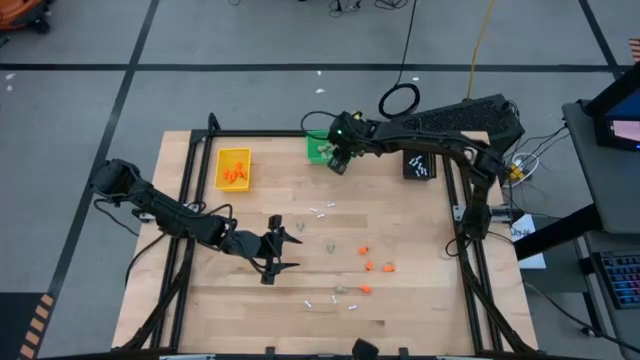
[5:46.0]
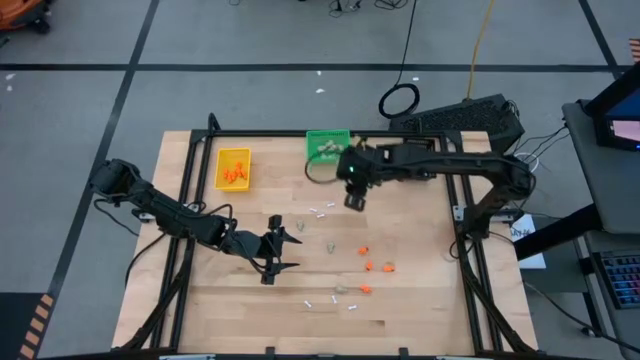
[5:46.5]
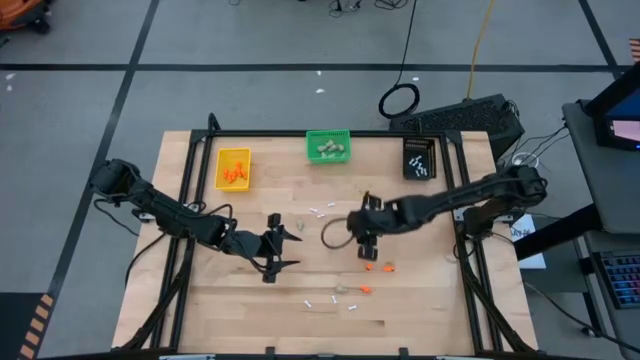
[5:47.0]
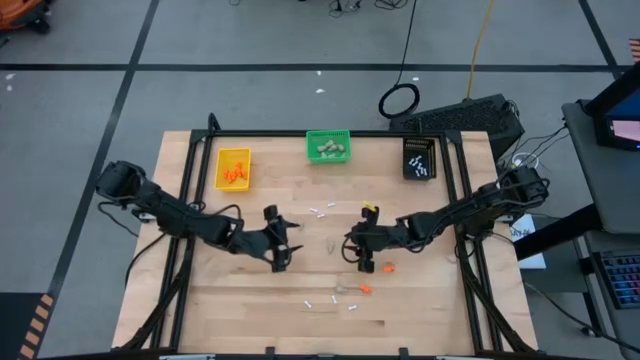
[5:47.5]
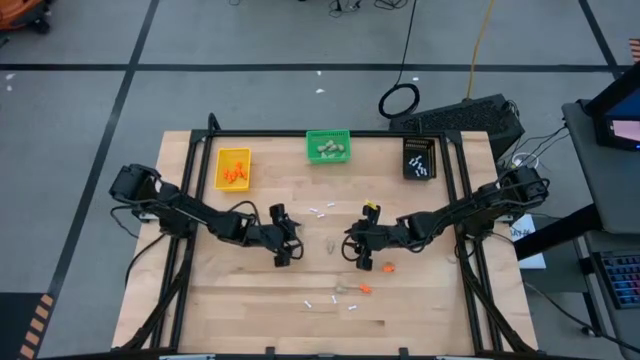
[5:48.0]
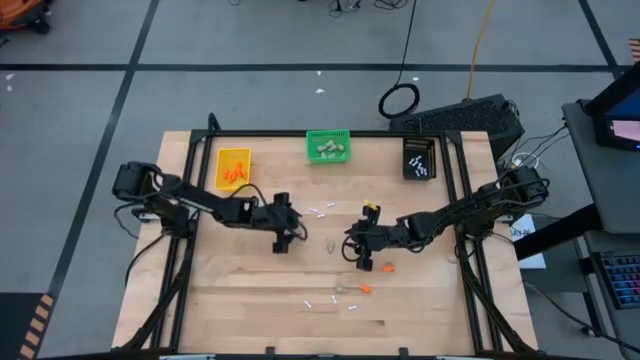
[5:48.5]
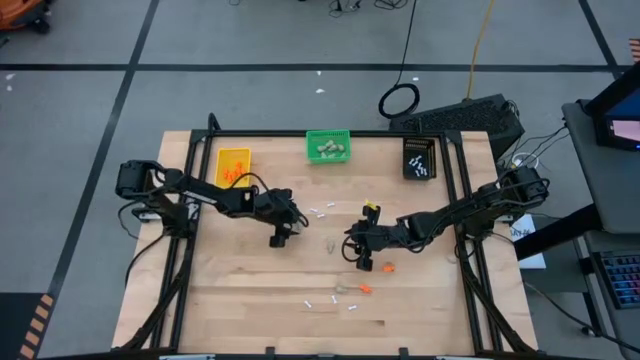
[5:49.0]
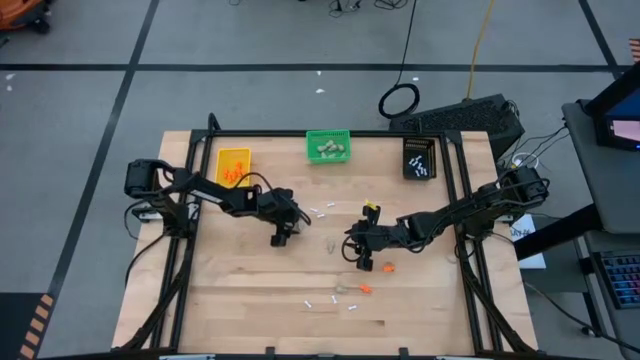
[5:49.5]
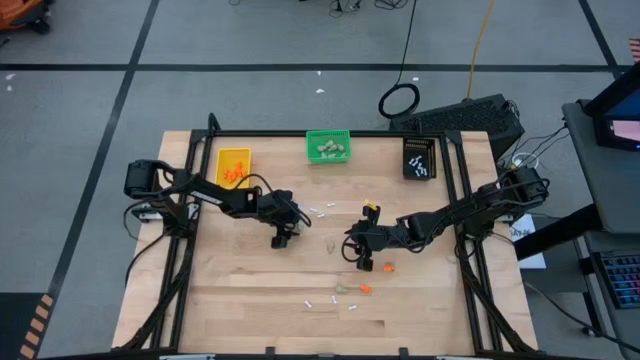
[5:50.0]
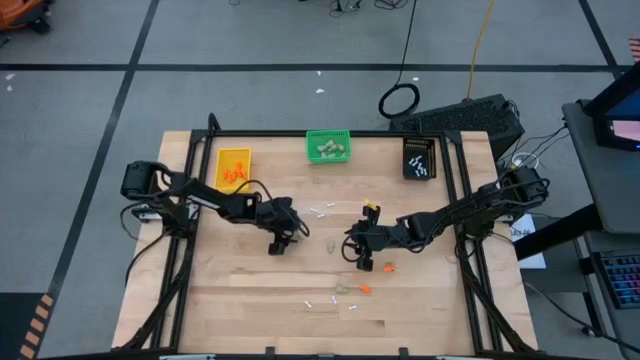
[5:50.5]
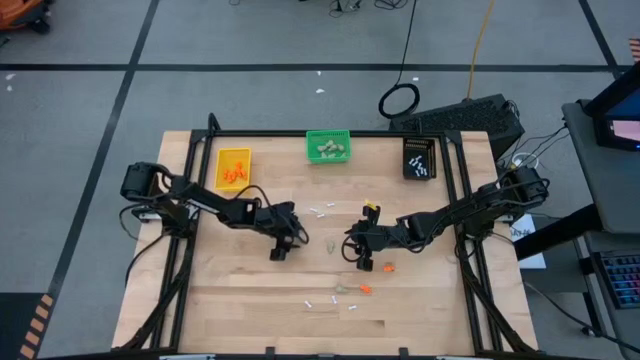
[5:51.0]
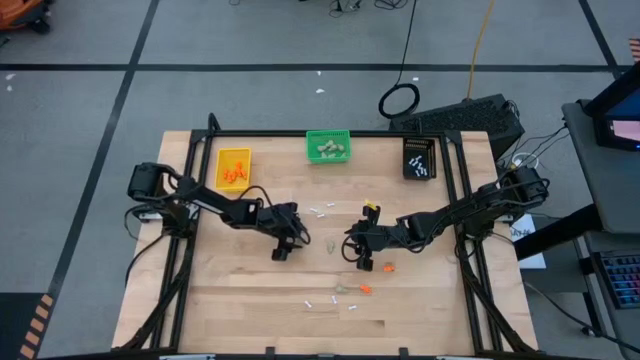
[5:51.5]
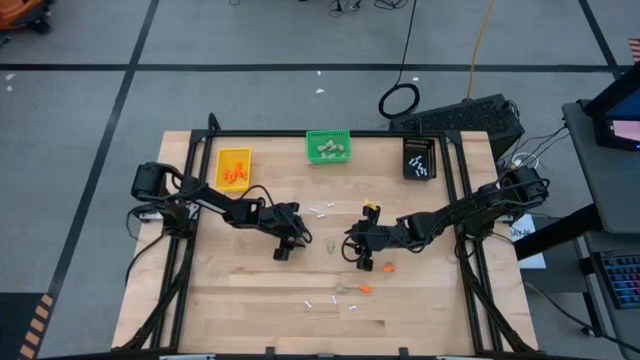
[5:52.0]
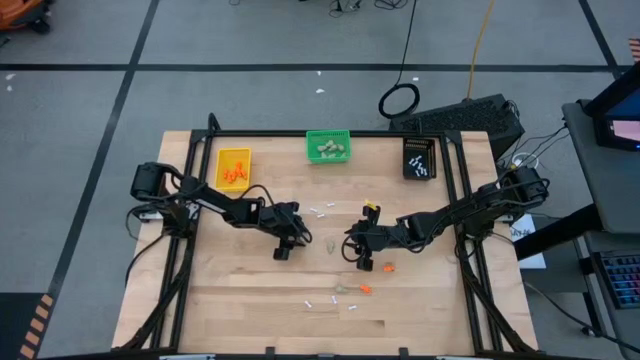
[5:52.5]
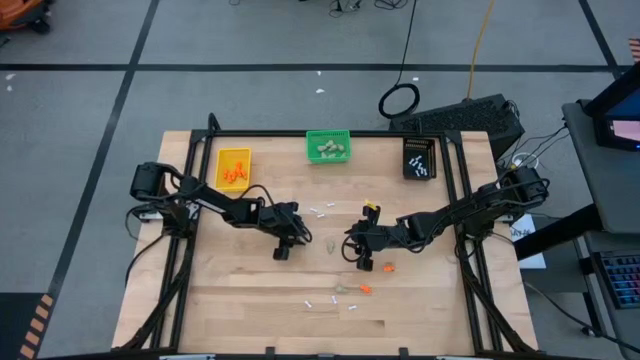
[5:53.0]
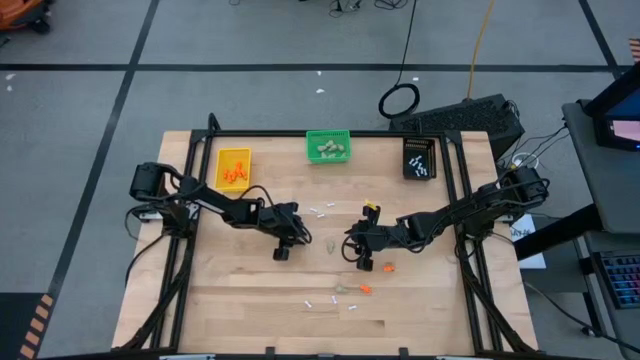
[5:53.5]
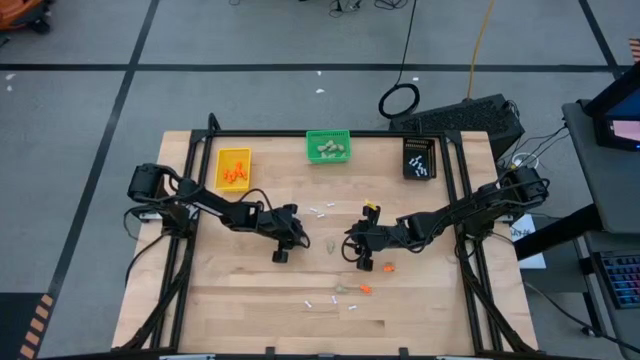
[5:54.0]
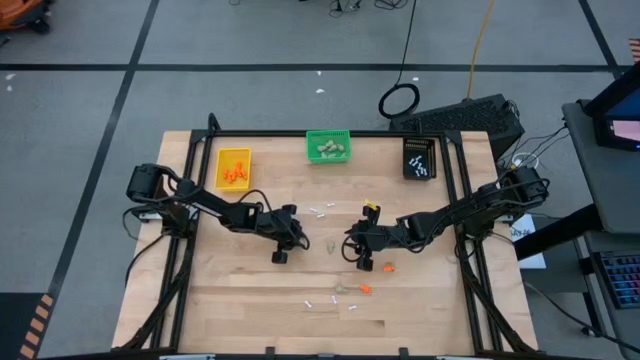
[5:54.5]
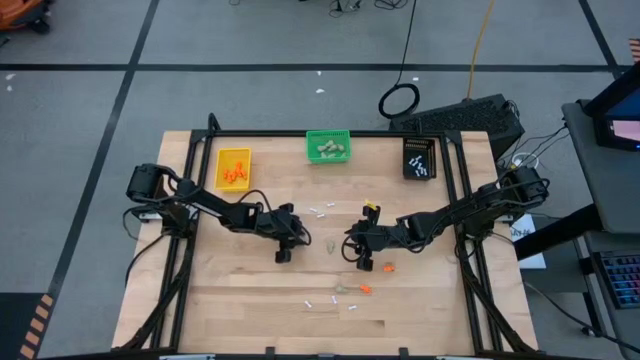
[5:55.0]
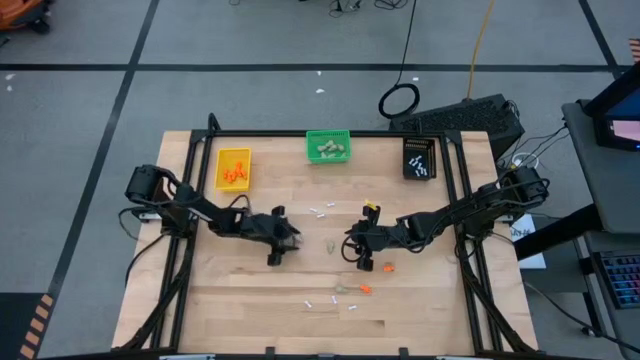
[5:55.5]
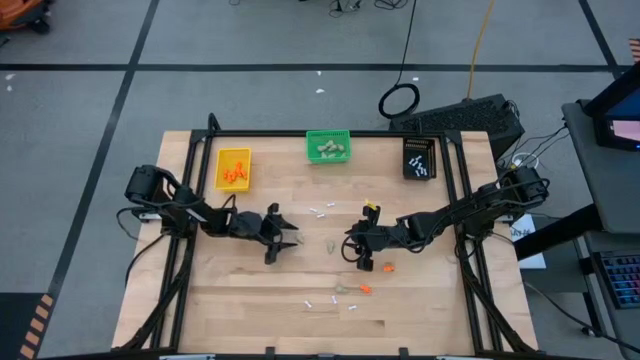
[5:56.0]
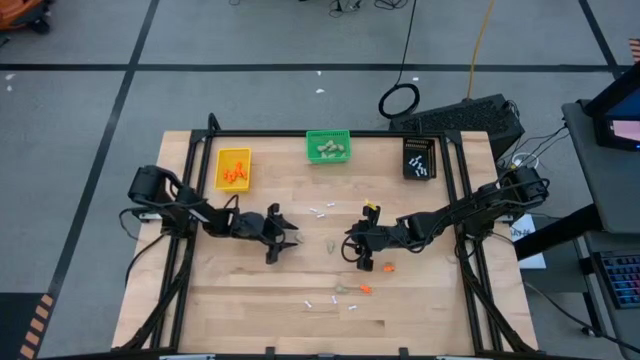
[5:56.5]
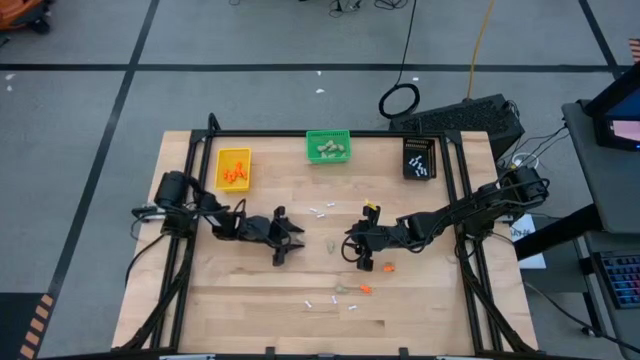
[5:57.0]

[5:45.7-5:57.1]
Task: Sort Halloween decoration
Put the gray skull toy into the green bin

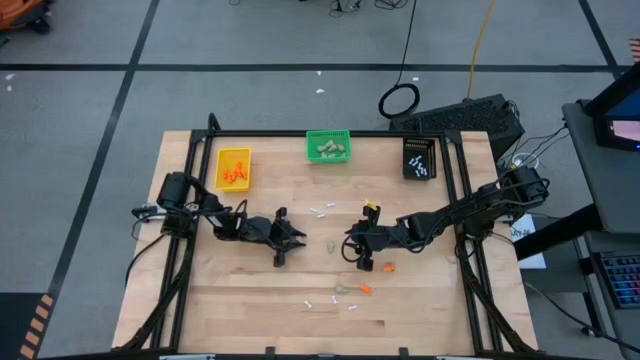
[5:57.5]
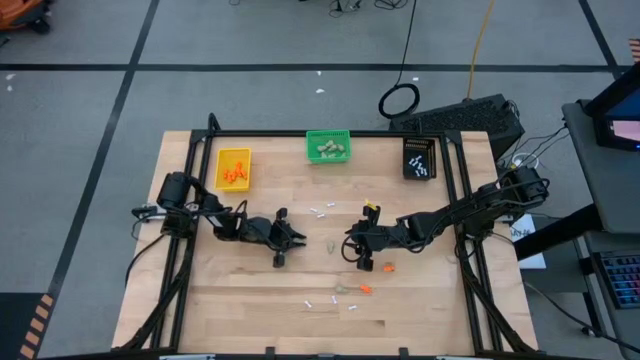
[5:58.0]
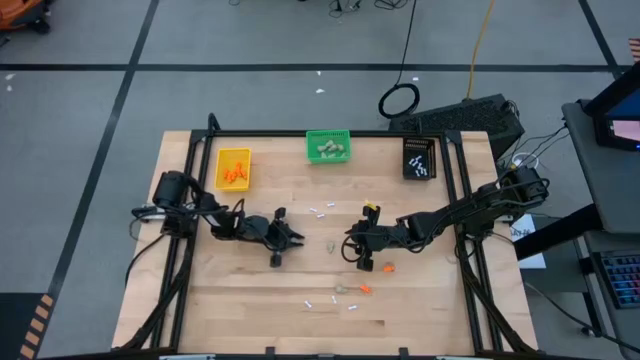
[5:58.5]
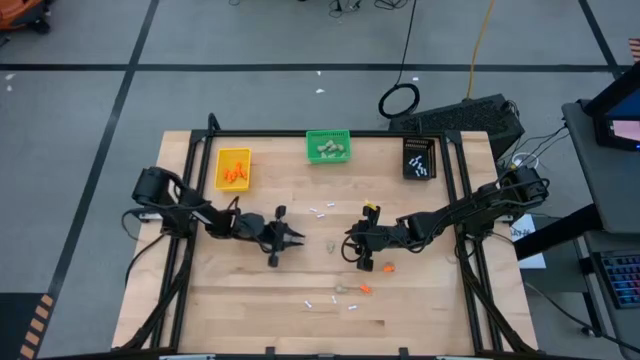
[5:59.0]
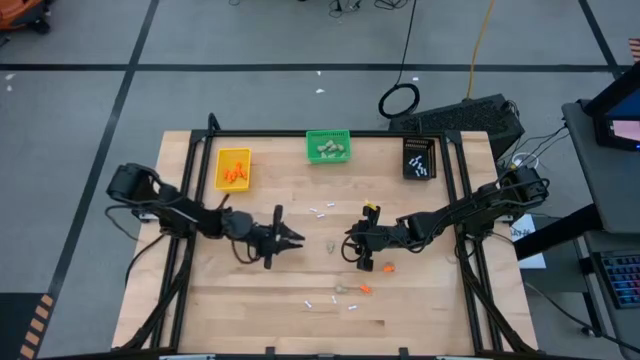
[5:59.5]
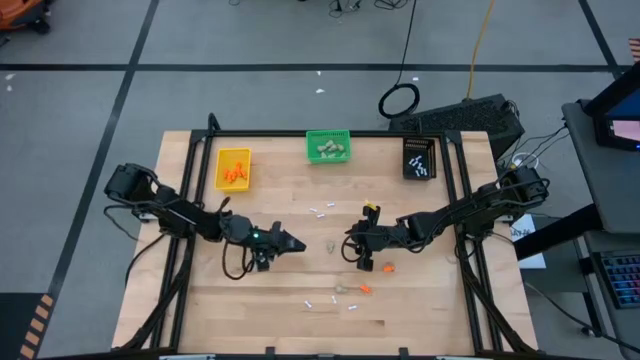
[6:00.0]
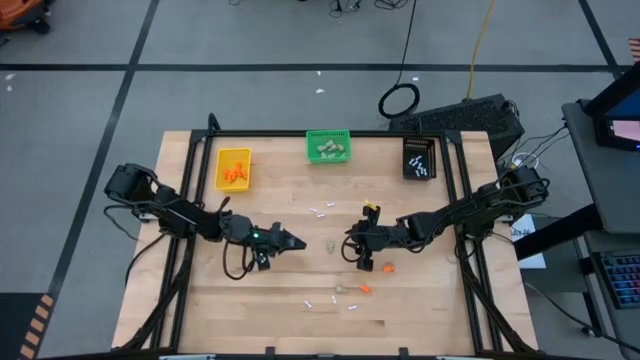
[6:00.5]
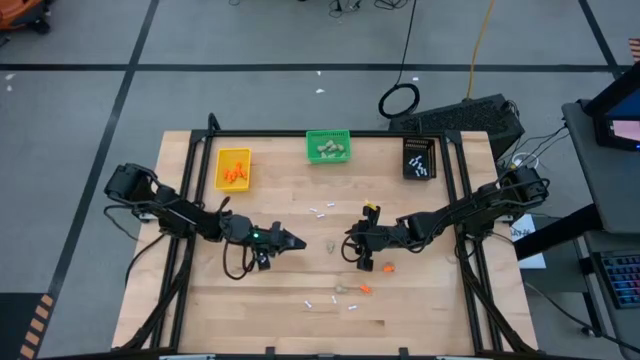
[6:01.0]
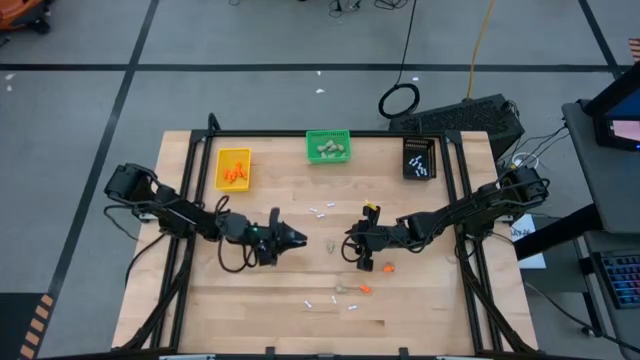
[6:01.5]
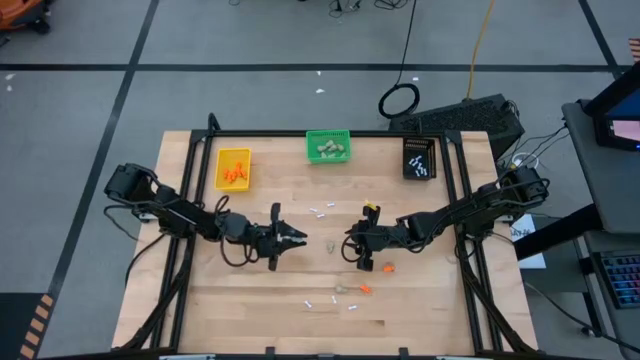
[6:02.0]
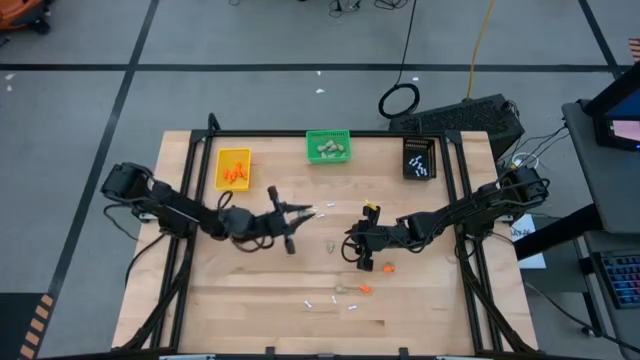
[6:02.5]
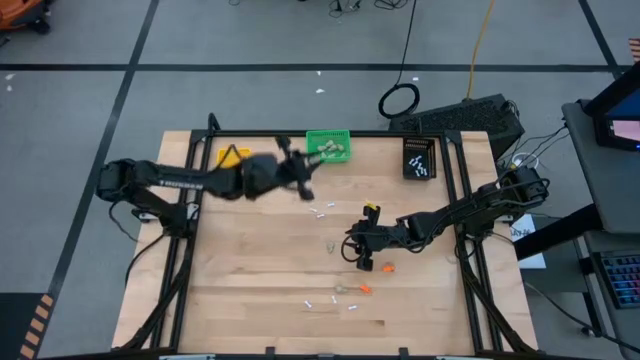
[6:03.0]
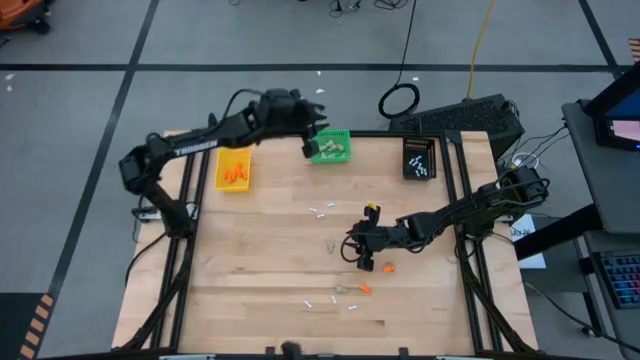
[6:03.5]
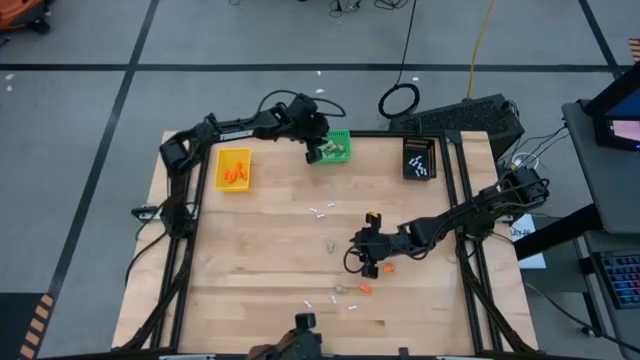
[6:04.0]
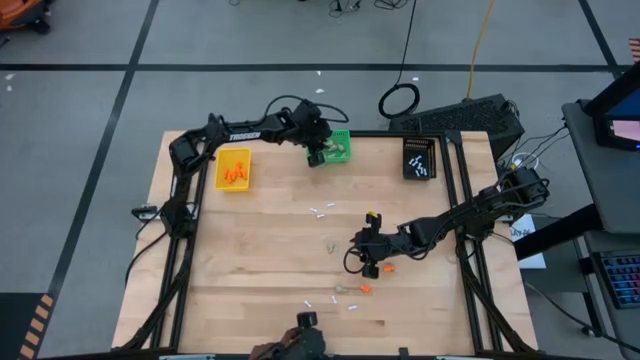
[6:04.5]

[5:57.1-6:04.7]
Put the gray skull toy into the green bin

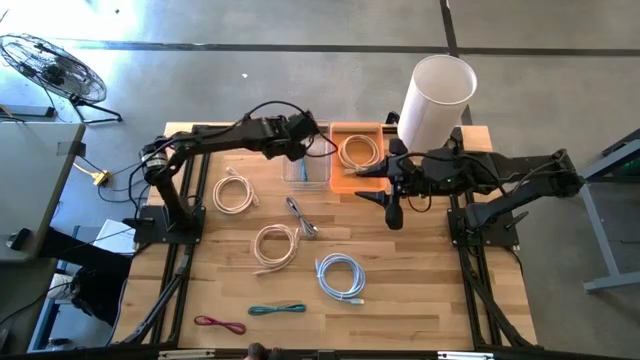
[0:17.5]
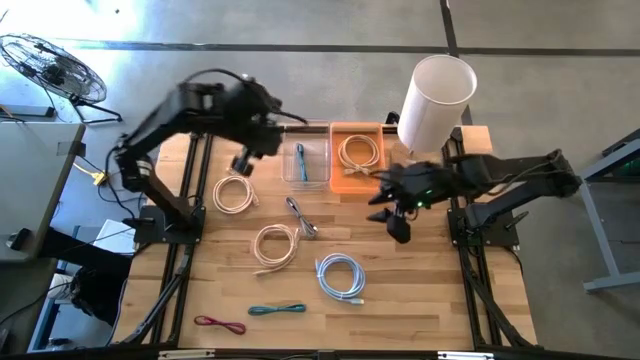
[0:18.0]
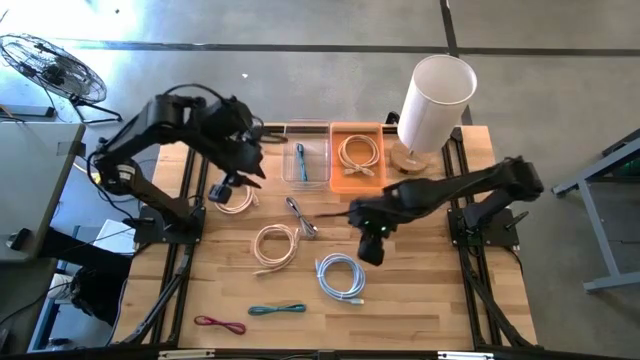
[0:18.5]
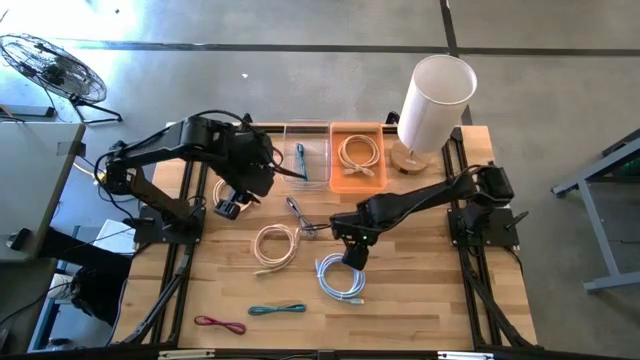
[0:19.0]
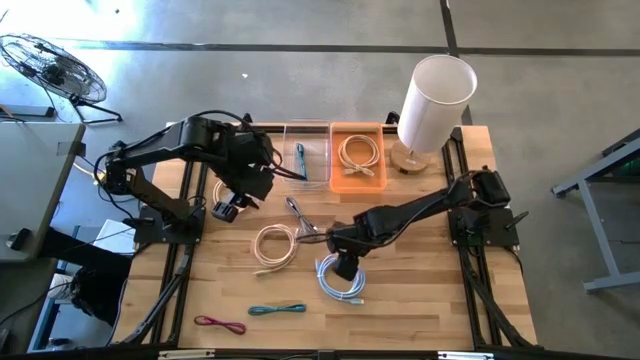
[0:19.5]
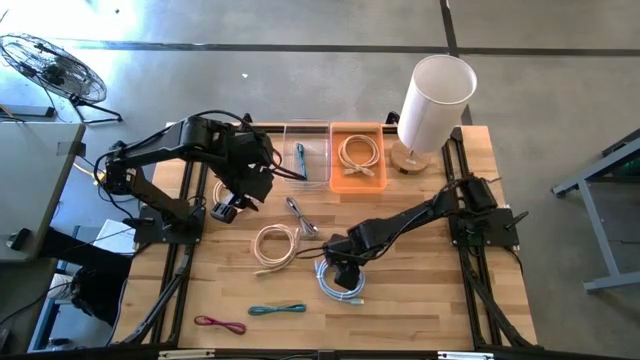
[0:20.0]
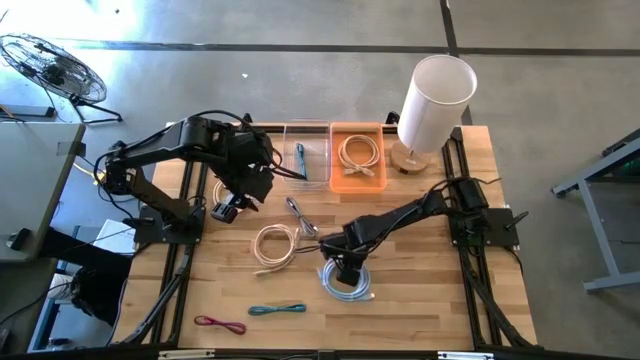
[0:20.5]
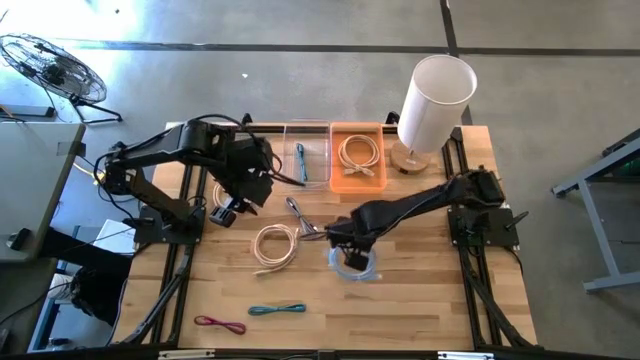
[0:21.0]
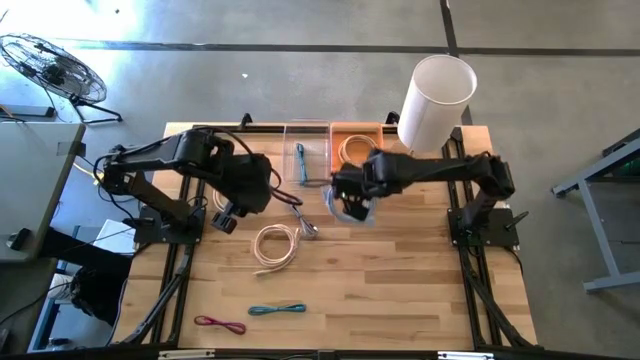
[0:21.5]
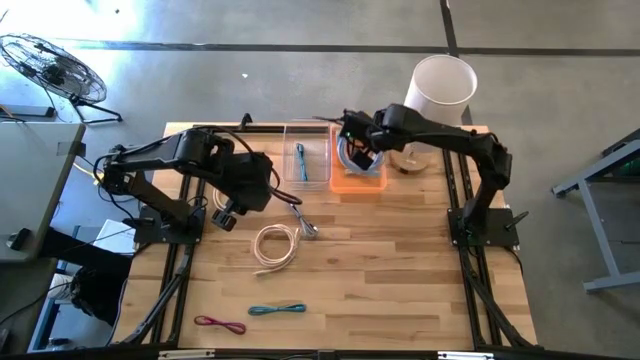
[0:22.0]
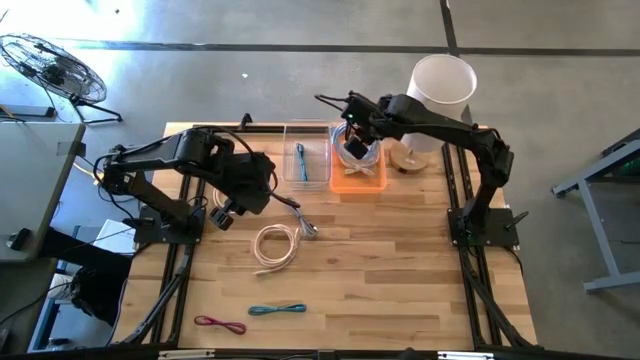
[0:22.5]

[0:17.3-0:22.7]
Task: Pick & Place USB Port
Put the light blue hdmi cable into the orange bin
